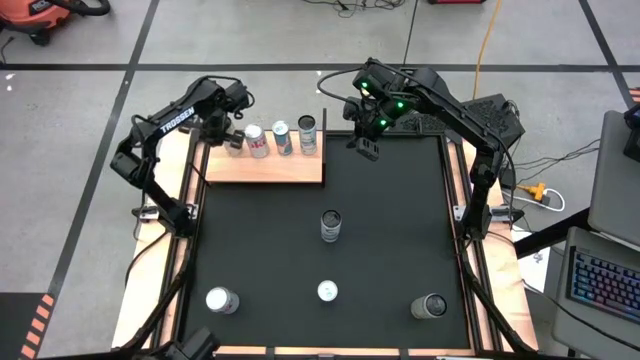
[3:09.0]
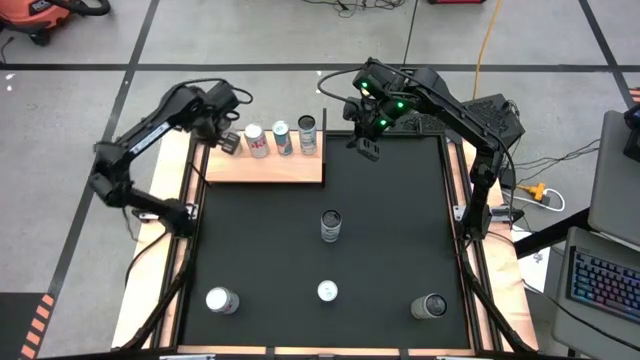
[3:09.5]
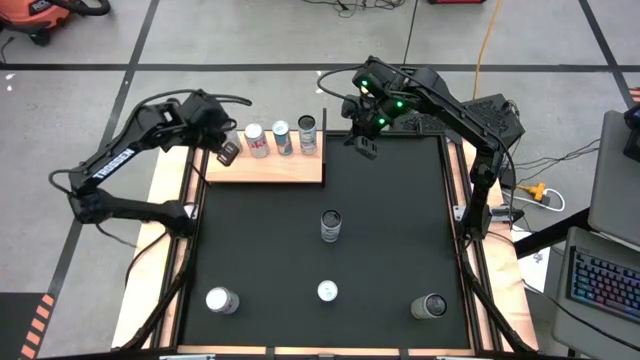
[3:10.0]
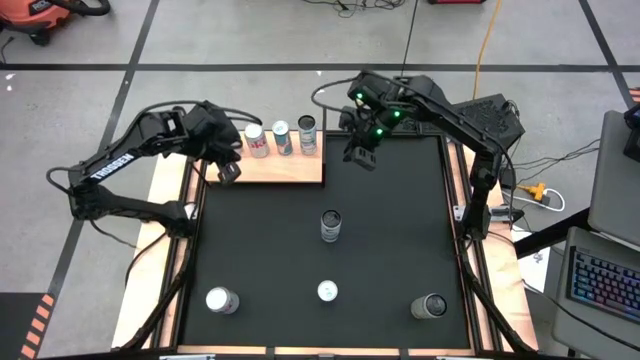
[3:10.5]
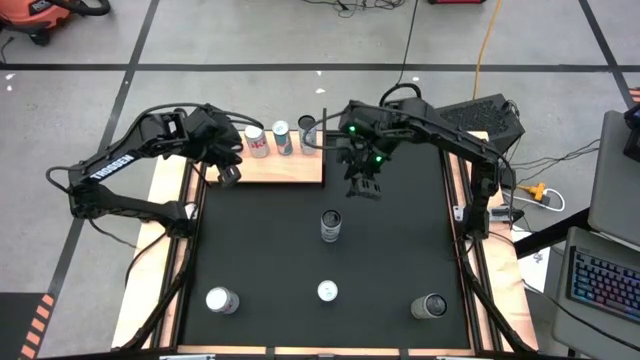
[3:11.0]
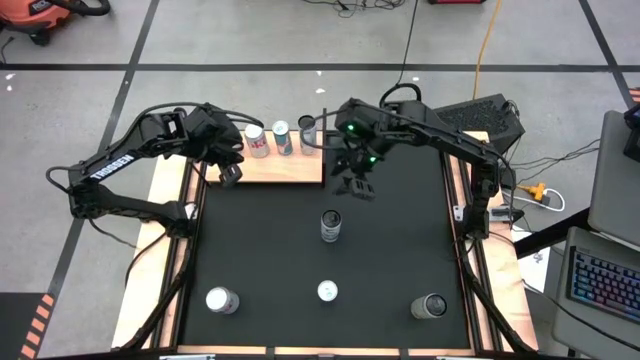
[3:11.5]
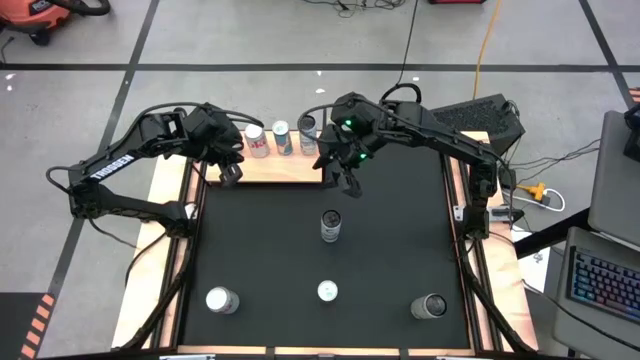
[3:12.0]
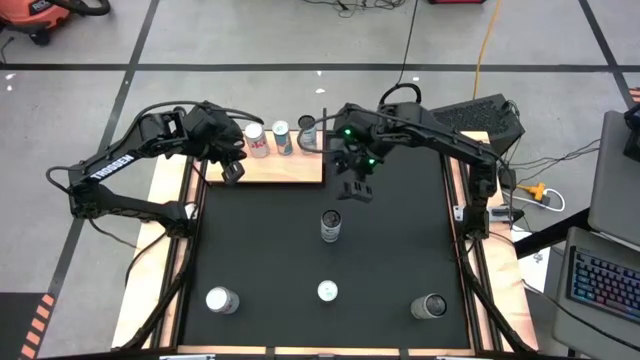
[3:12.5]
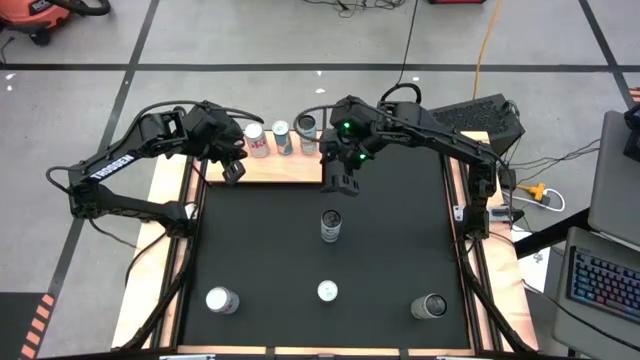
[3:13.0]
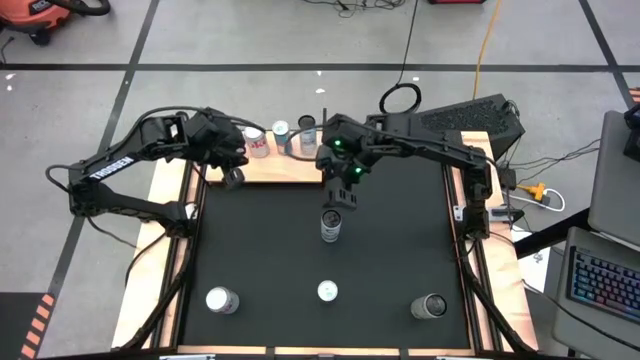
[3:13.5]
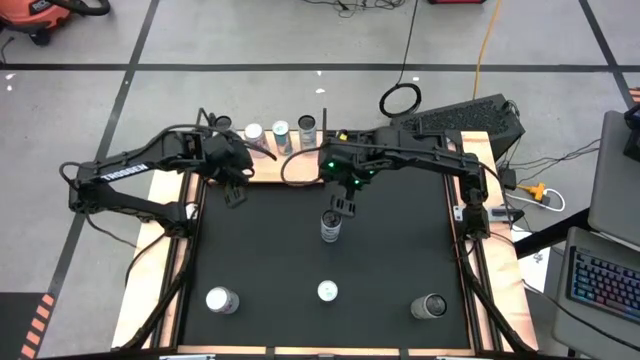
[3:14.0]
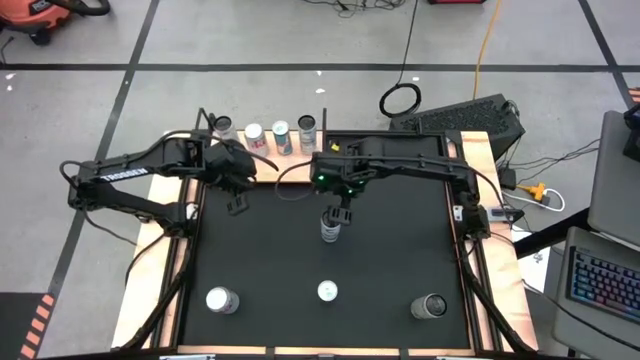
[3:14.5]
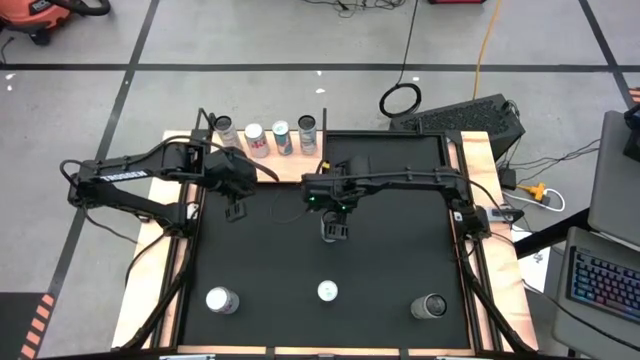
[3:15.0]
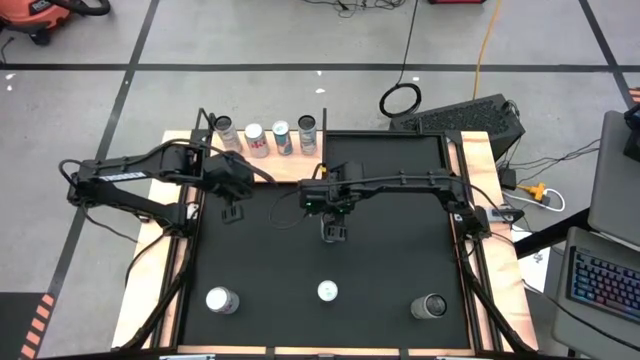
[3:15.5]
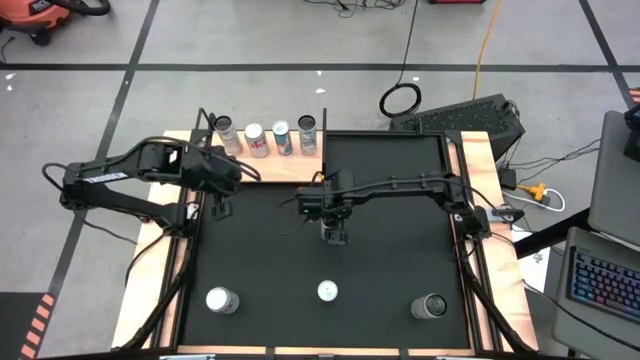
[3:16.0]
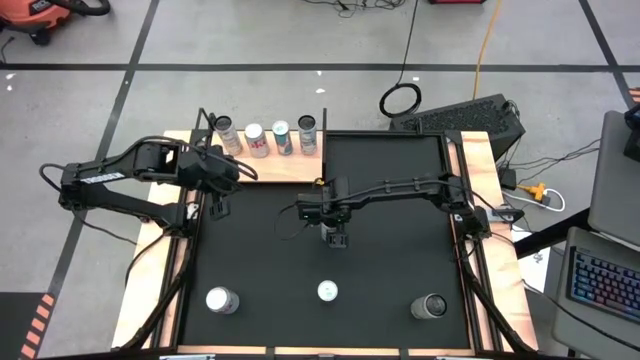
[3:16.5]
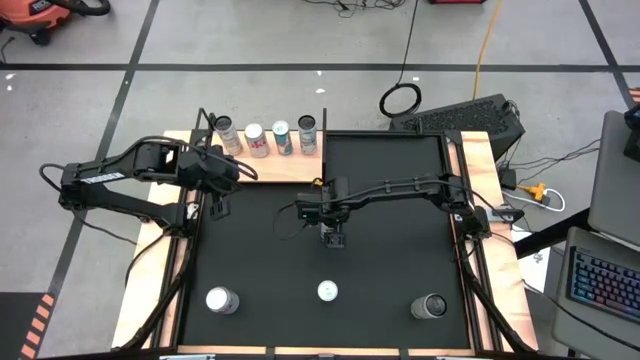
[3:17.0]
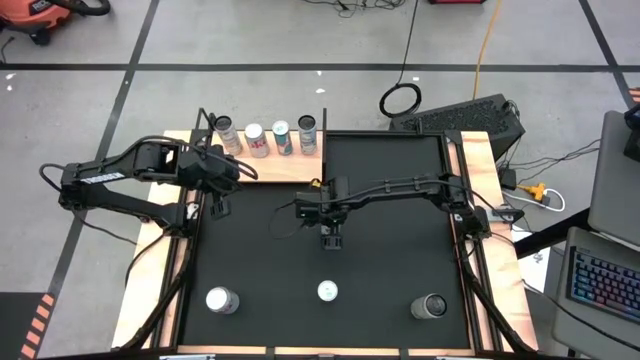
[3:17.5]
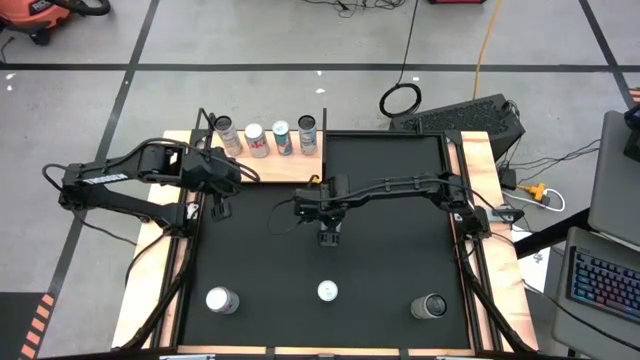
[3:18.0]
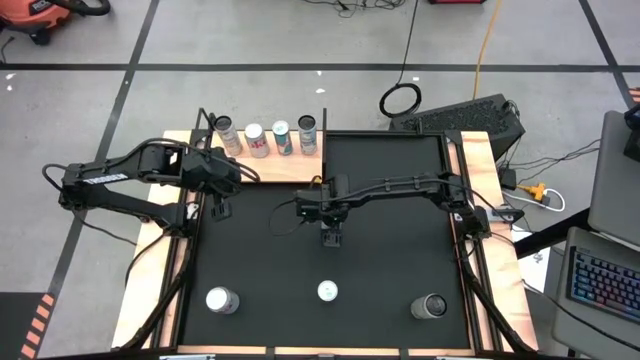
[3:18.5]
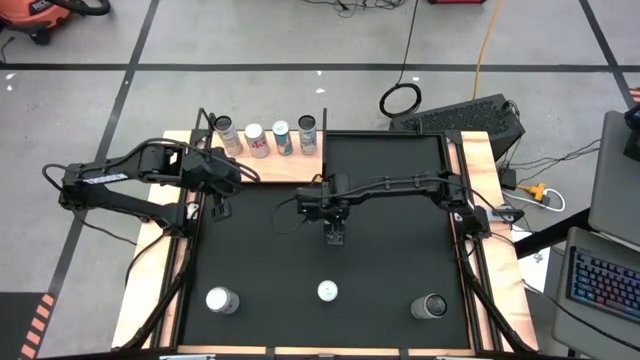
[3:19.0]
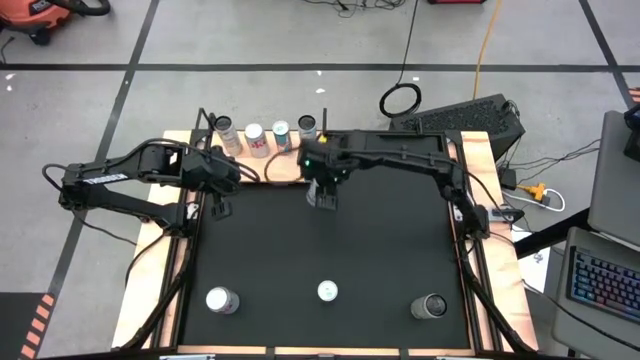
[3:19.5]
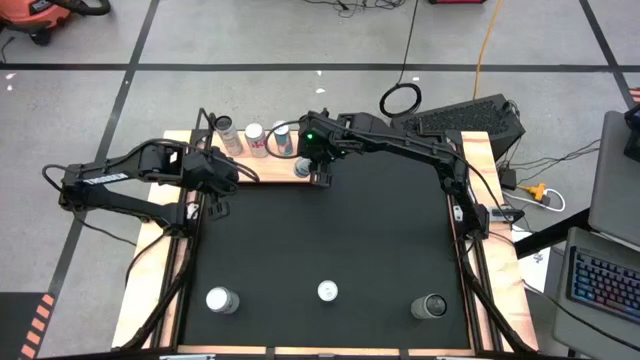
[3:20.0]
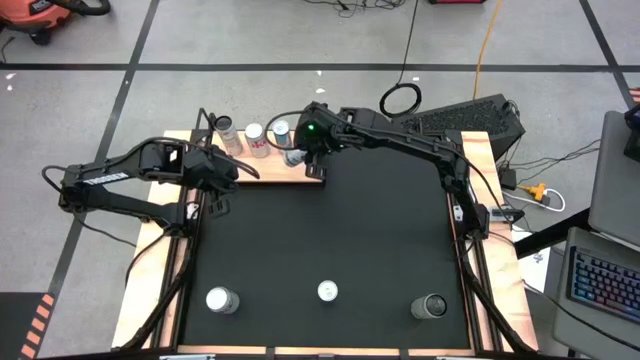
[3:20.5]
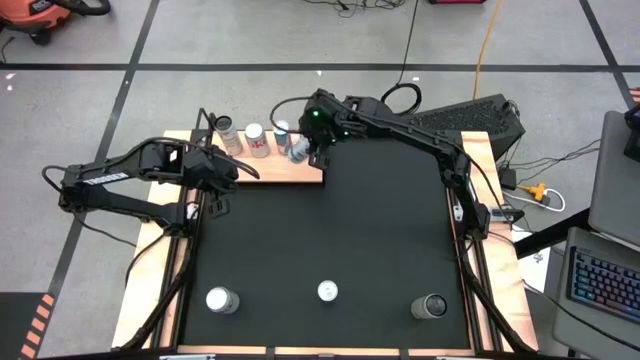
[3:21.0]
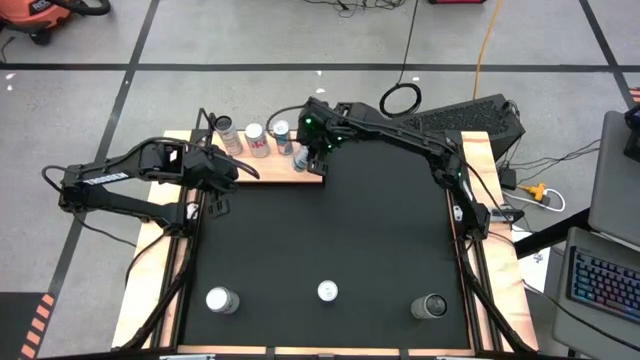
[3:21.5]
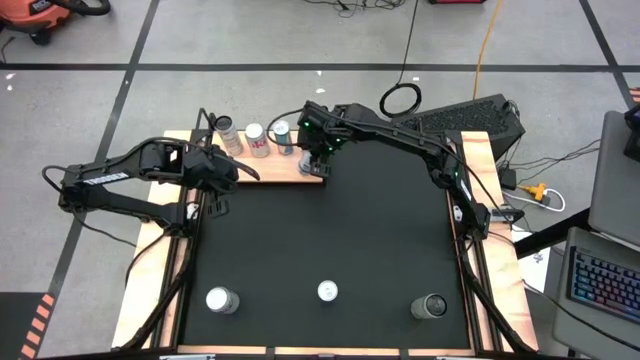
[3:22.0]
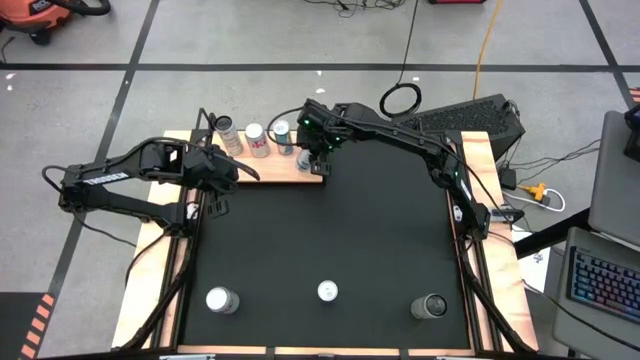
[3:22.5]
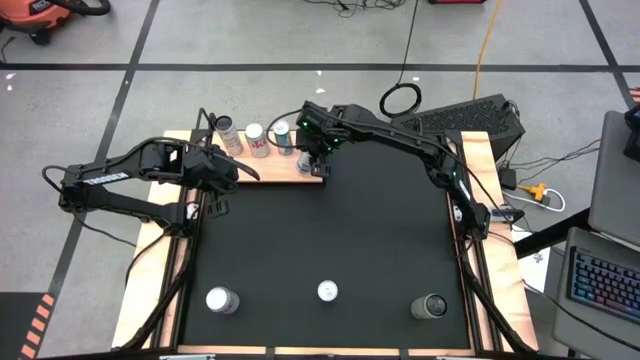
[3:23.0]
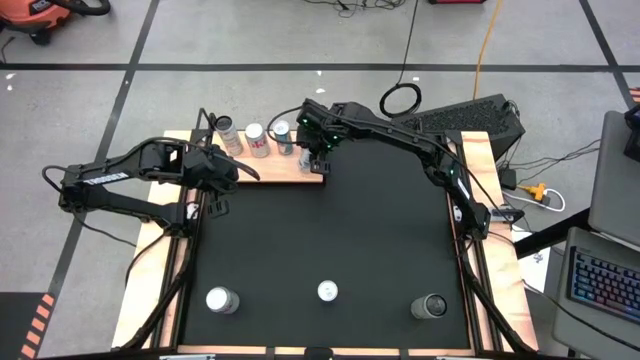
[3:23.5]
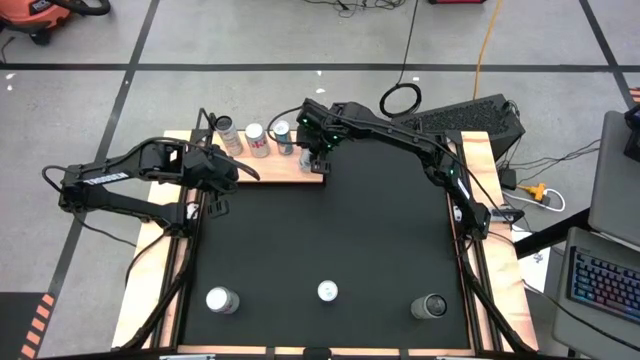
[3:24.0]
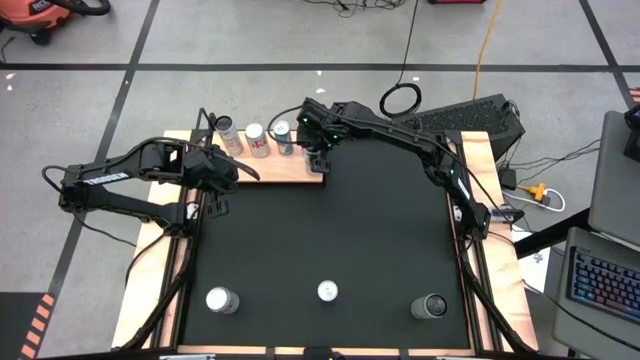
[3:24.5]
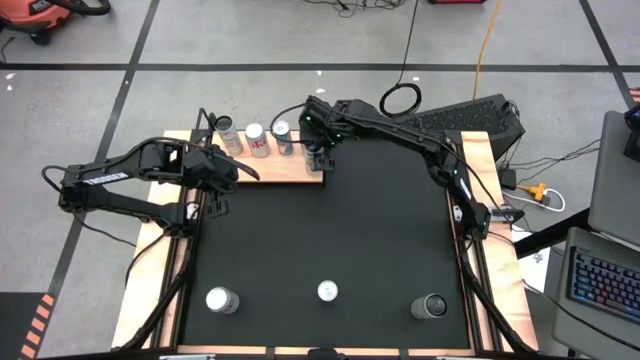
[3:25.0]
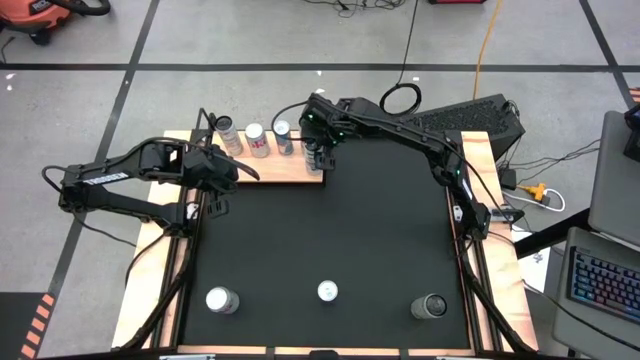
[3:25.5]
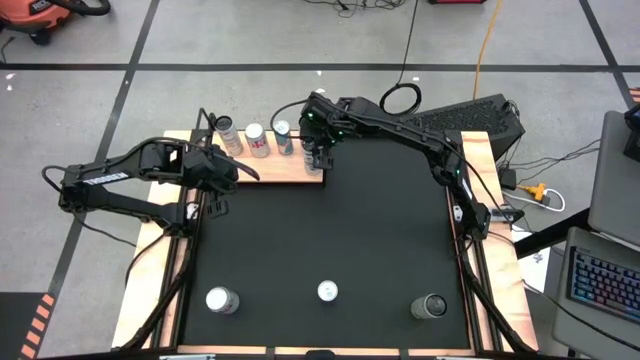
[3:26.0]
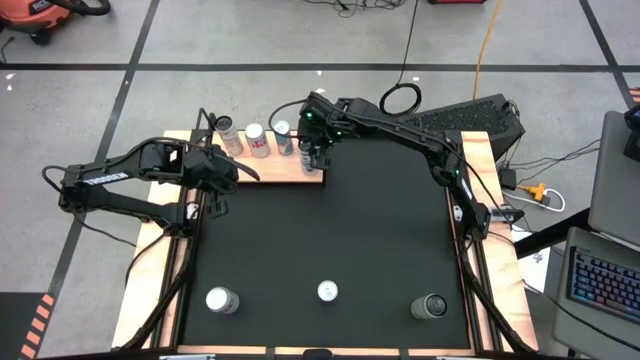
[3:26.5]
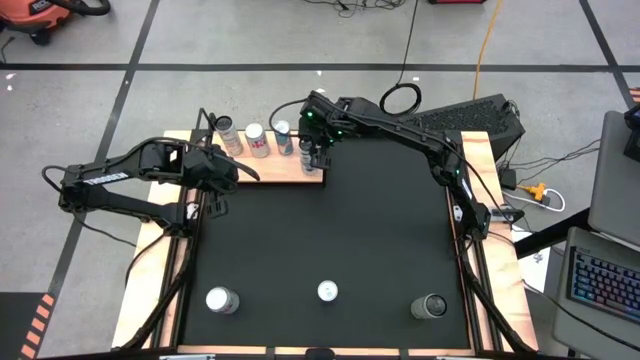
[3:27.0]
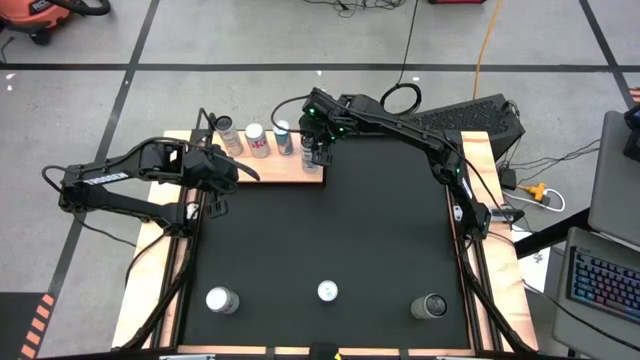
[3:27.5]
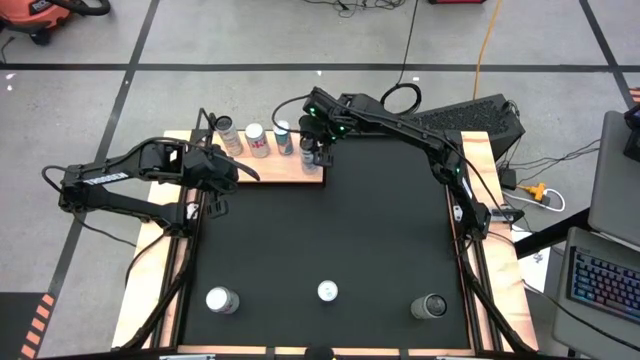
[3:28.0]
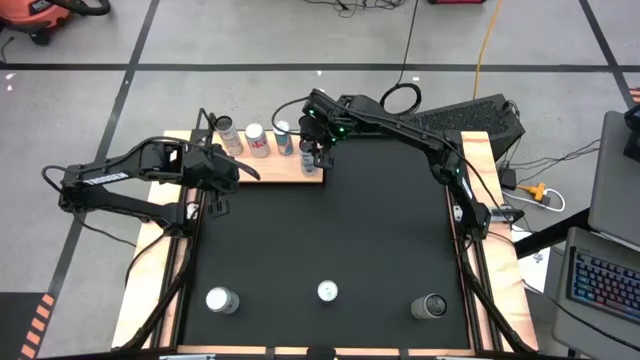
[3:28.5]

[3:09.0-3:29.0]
Task: Place canned beverage on shelf
Align the white and blue soda can with the other white and blue soda can on the shelf

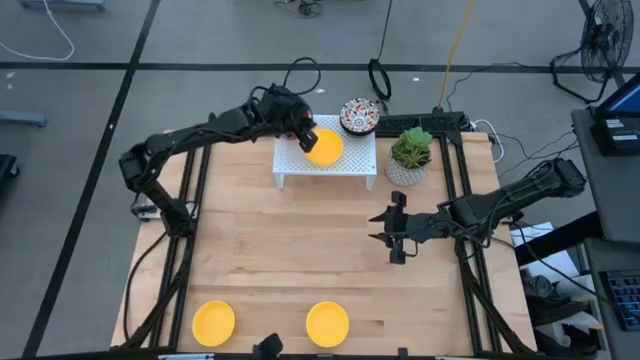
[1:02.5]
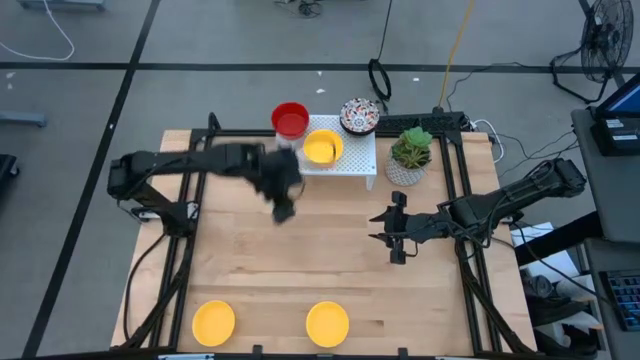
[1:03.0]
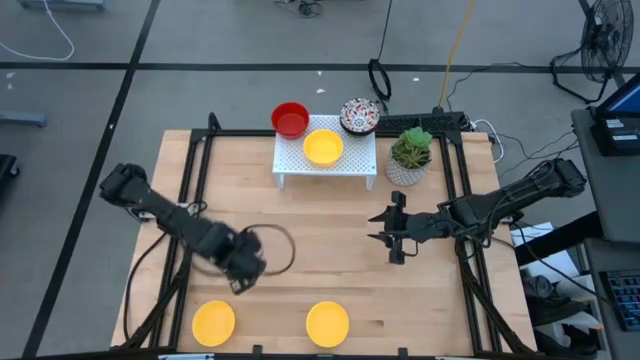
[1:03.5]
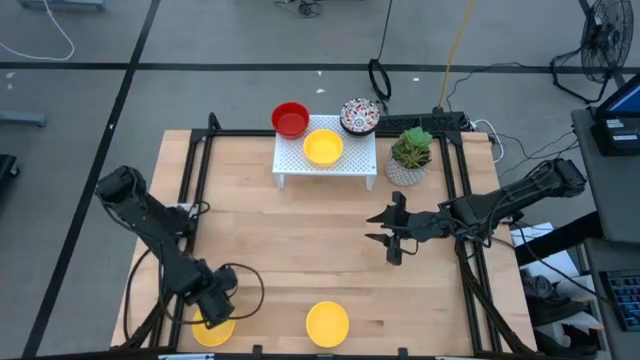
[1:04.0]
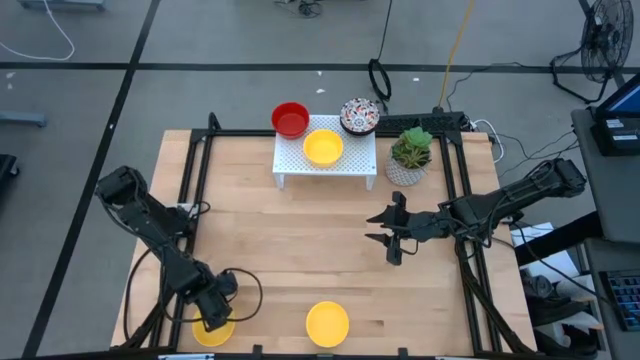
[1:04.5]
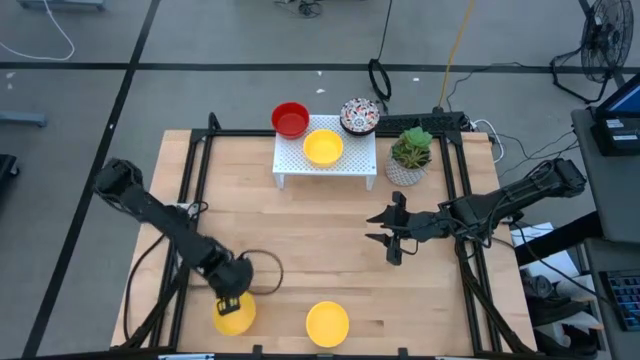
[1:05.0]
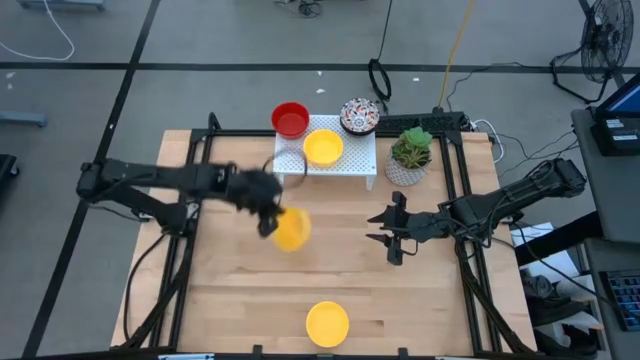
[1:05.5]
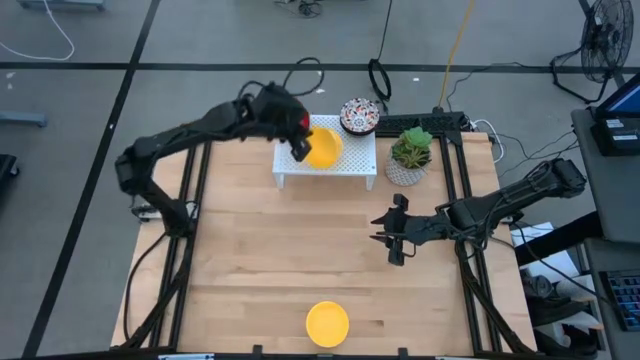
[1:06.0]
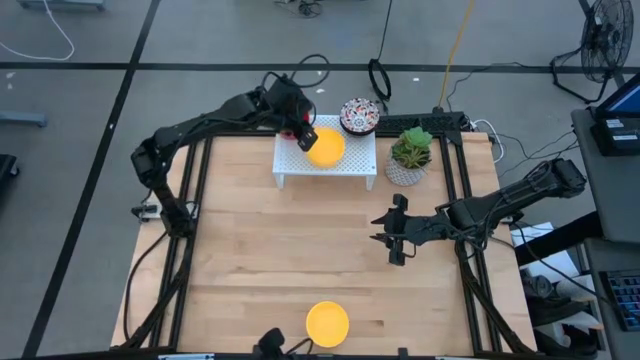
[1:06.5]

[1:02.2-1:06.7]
Task: Pick & Place Mini bowls
Stack the yellow bowl on the yellow bowl on the shelf
